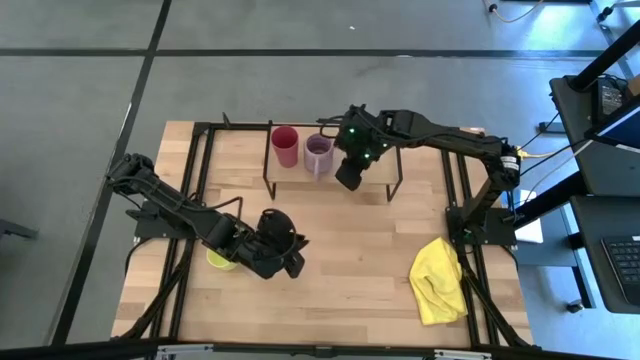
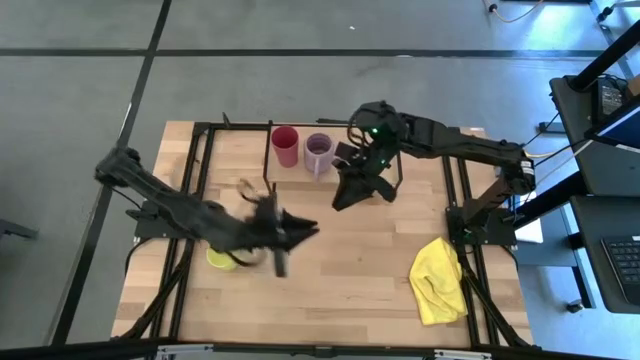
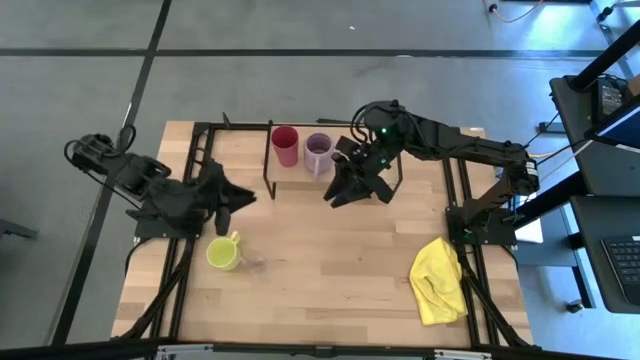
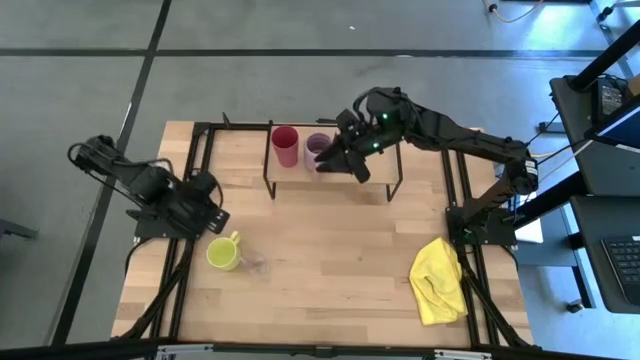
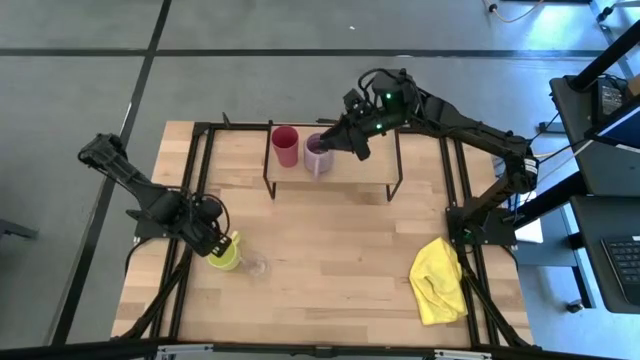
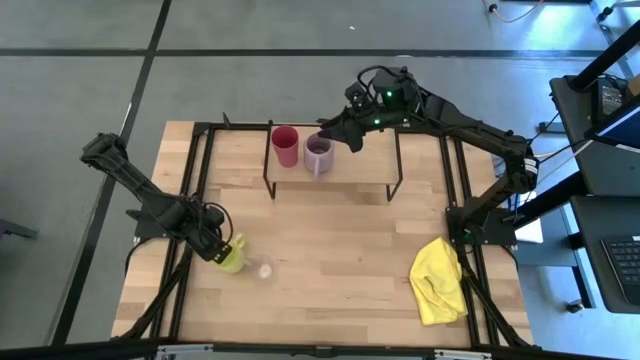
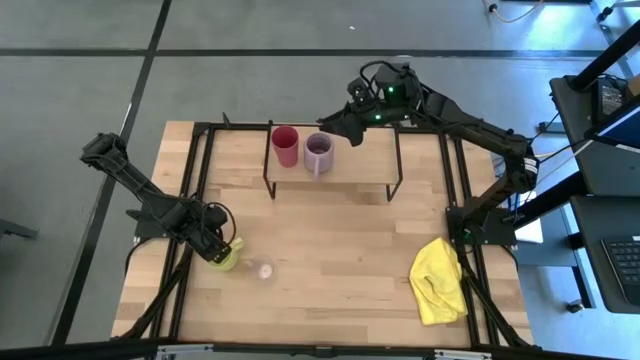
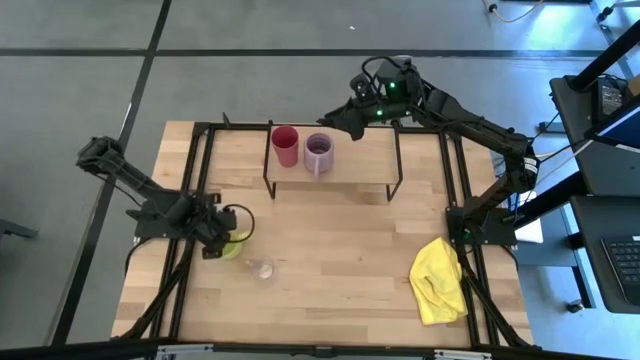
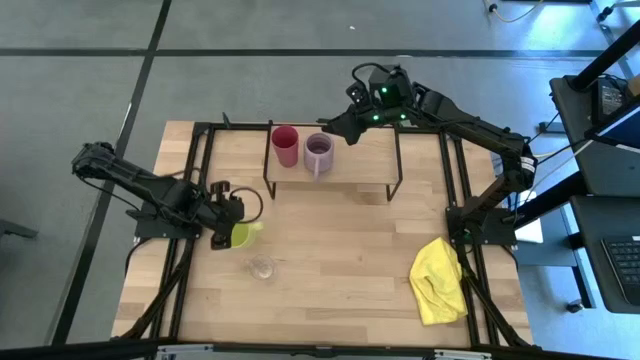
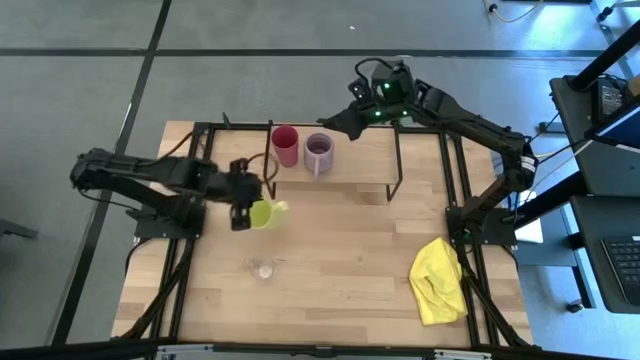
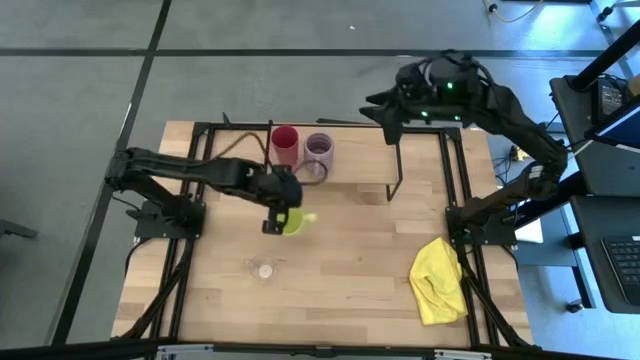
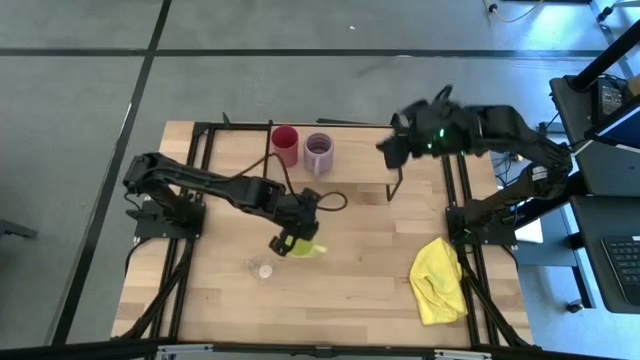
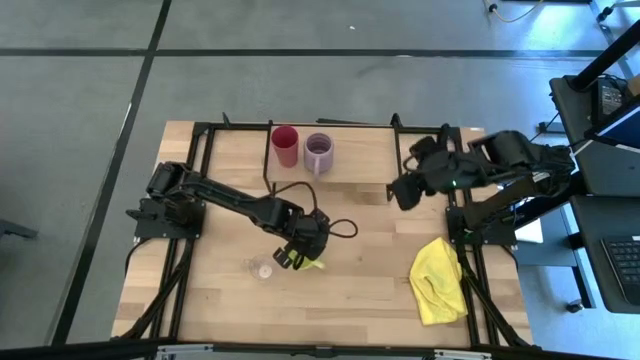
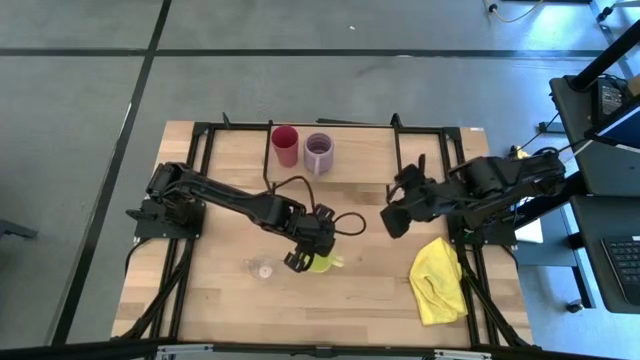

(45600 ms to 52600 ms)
Task: Stack small to large cups/mugs on shelf
Put the yellow mug on the shelf

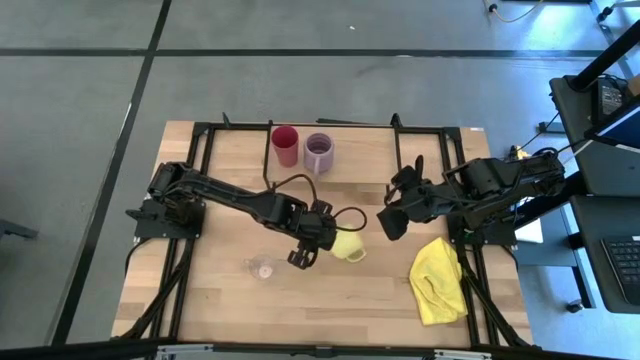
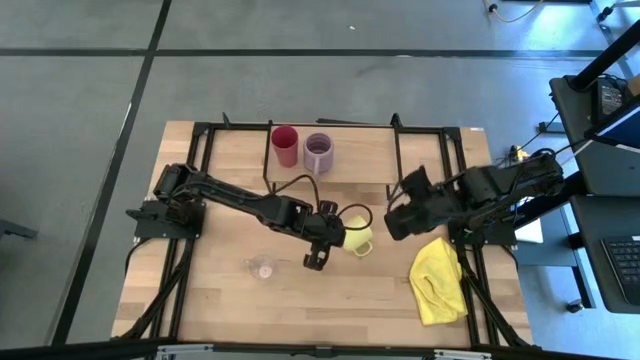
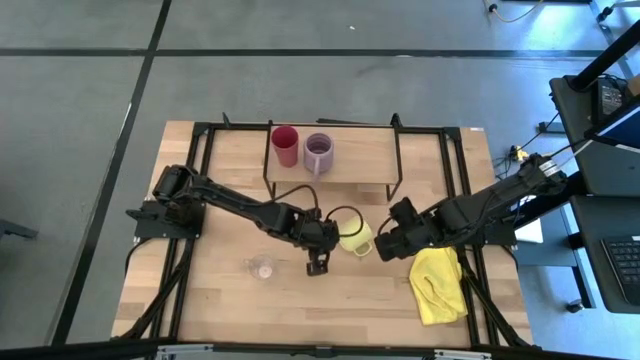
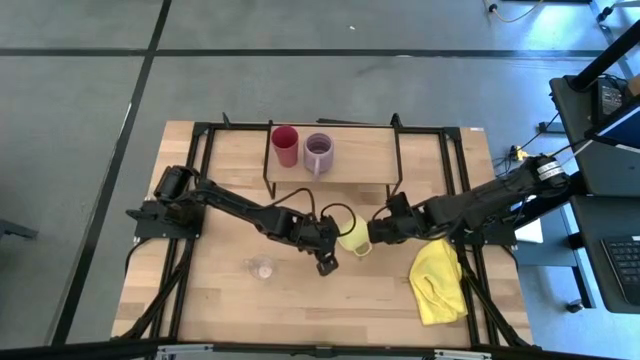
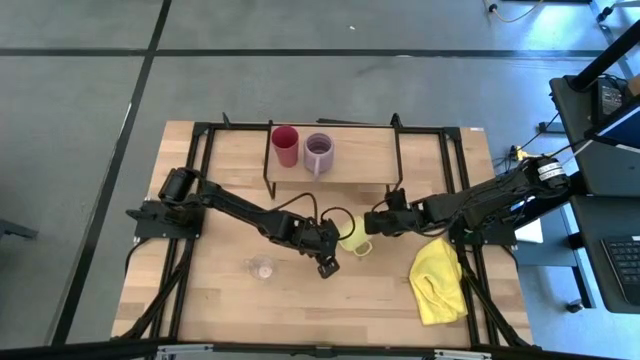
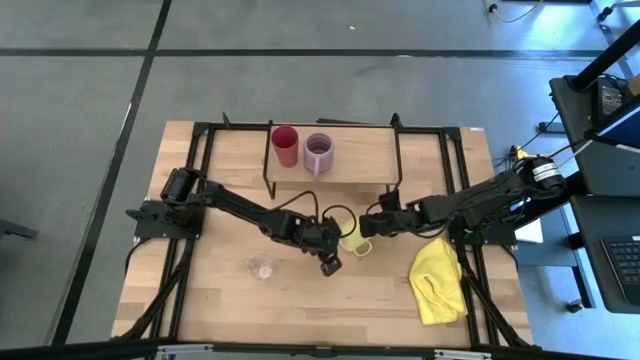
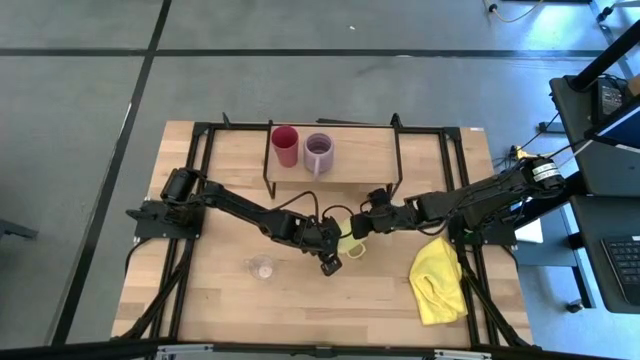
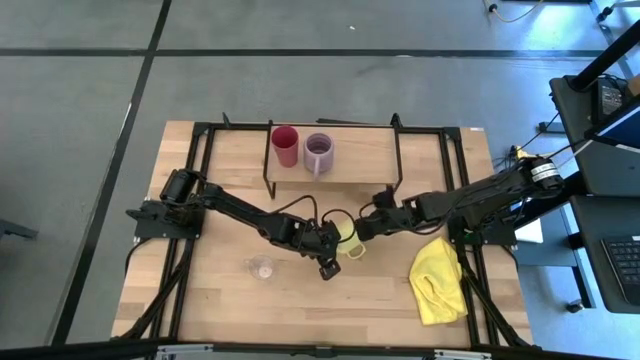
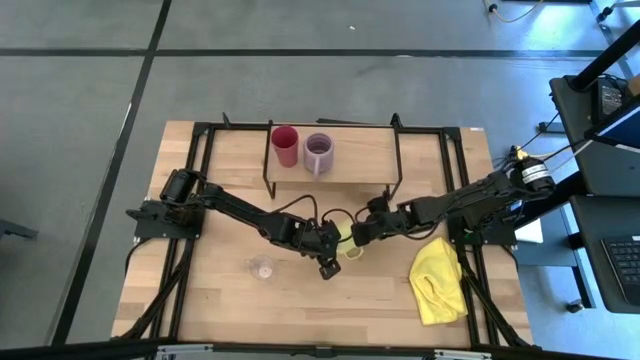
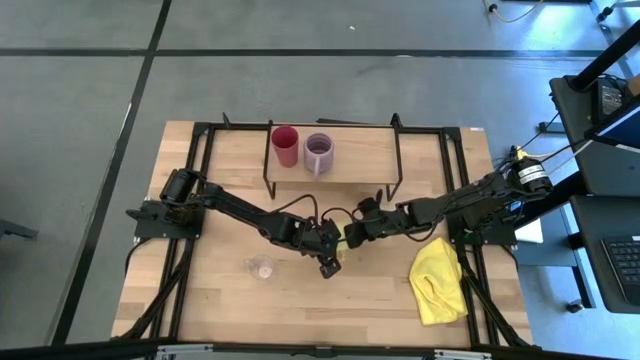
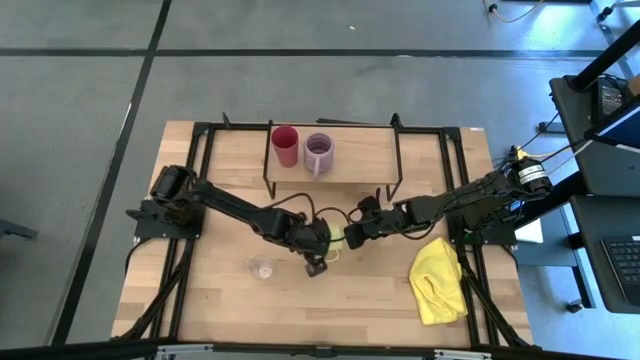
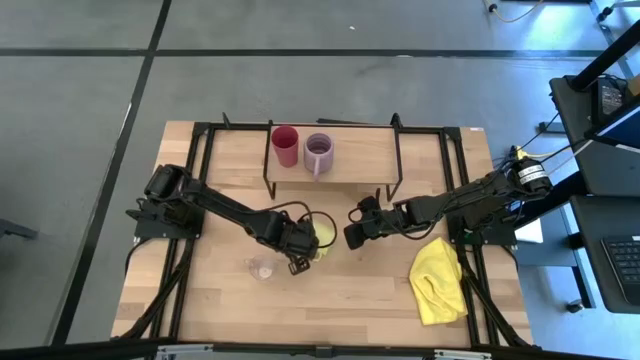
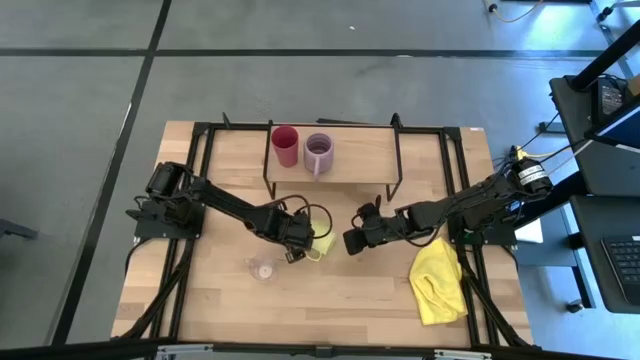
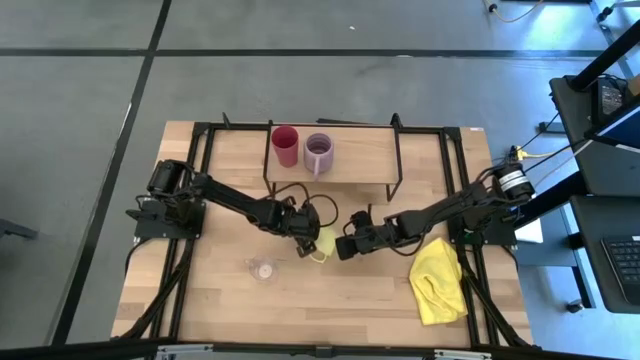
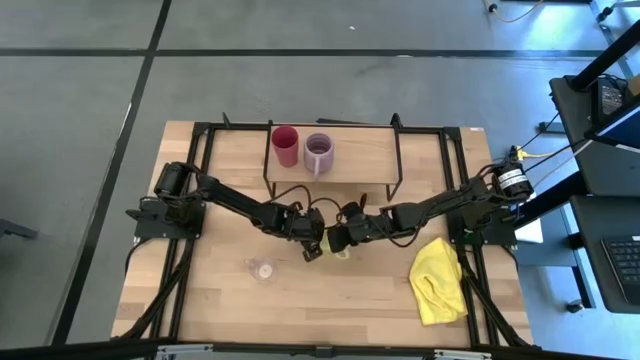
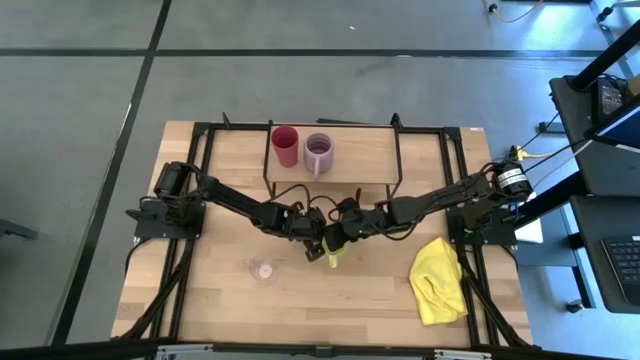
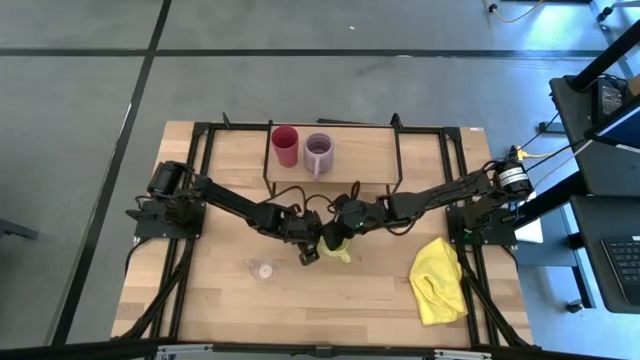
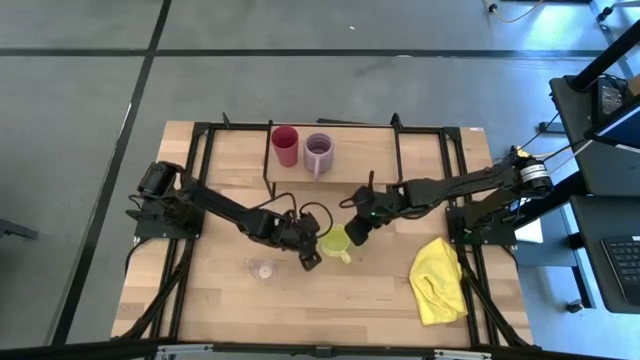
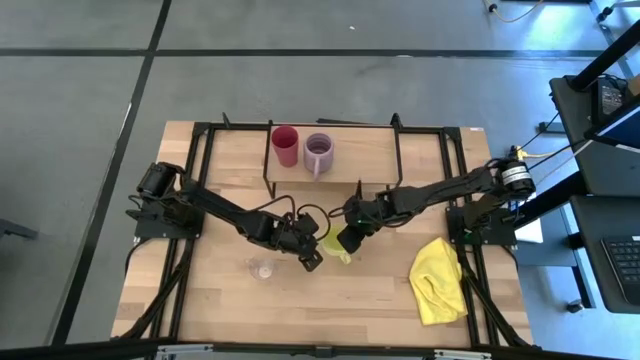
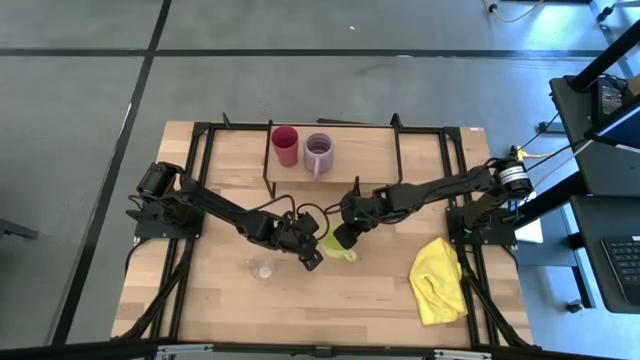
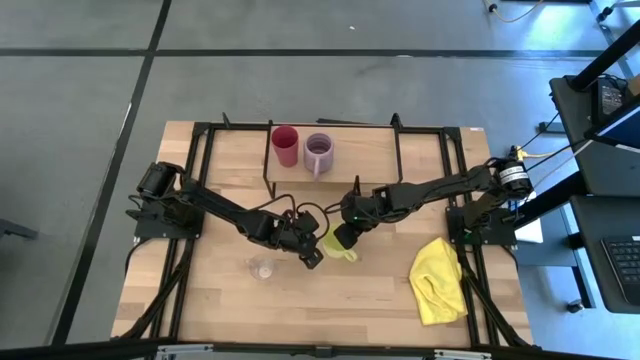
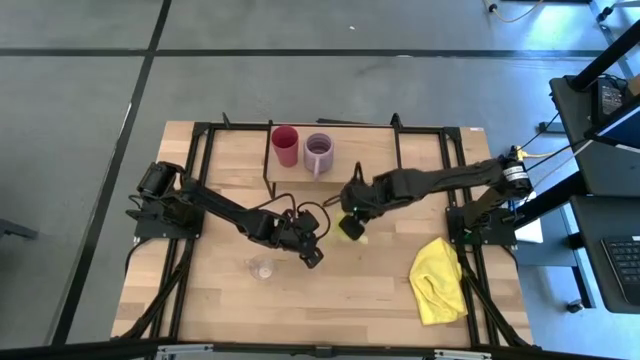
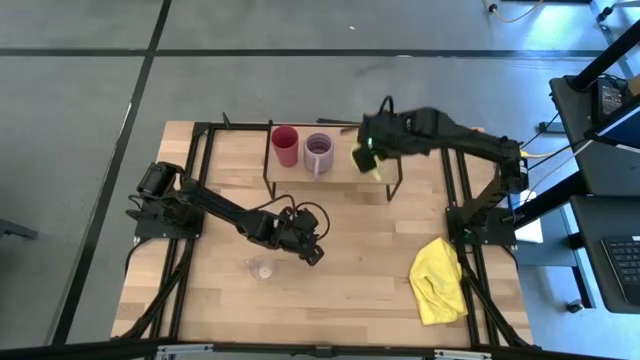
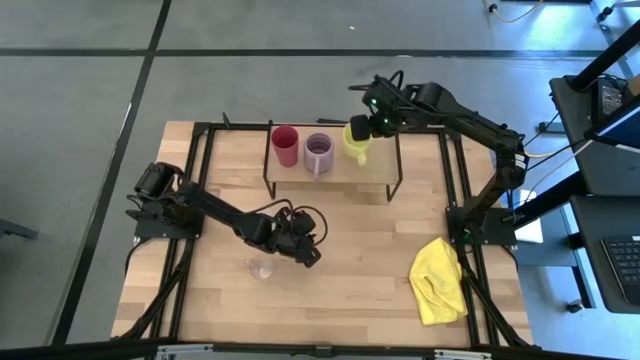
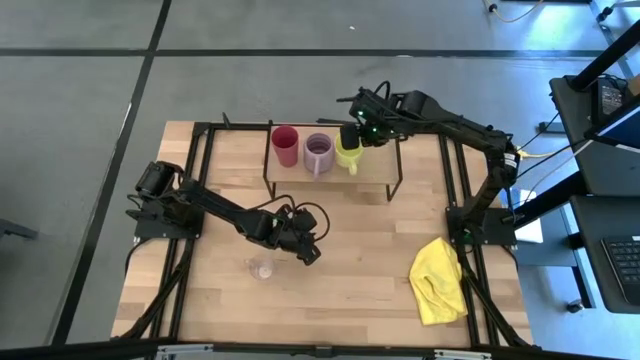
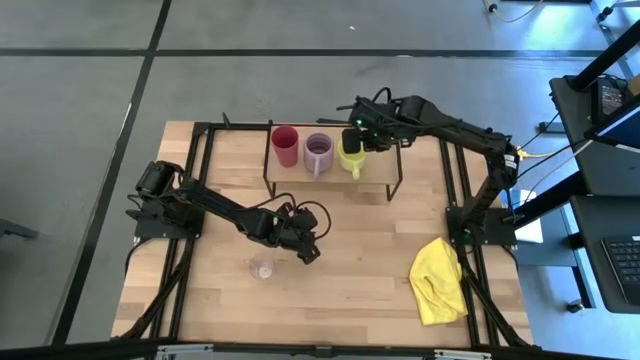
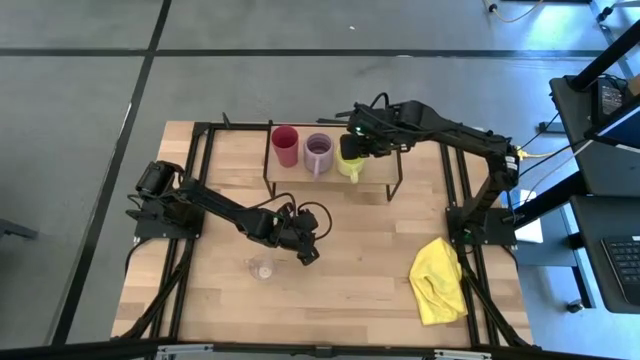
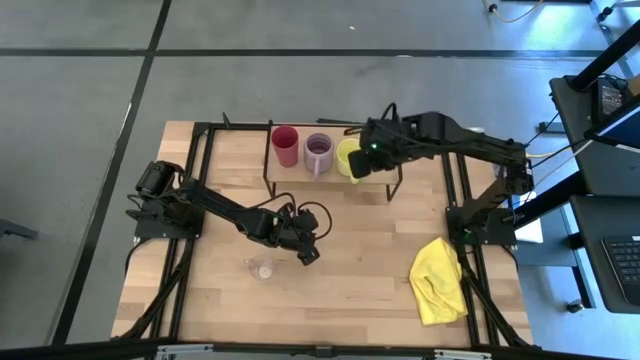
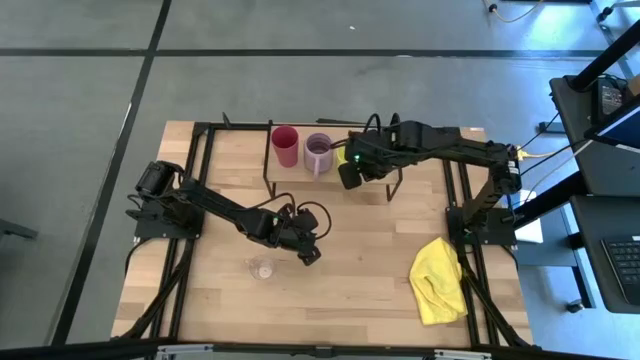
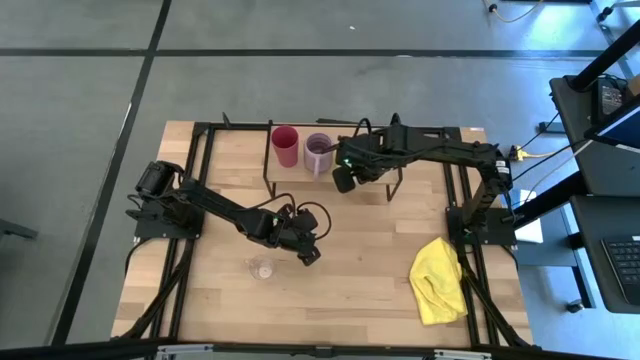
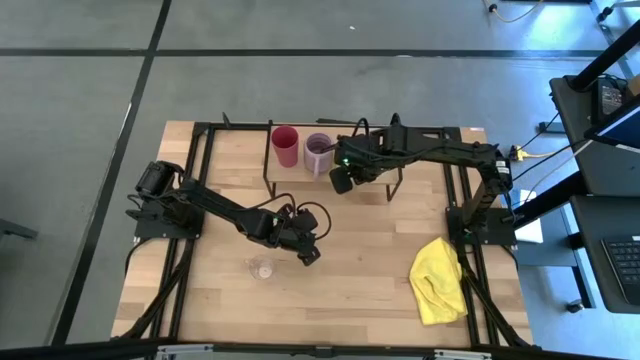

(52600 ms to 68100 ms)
Put the yellow mug on the shelf
